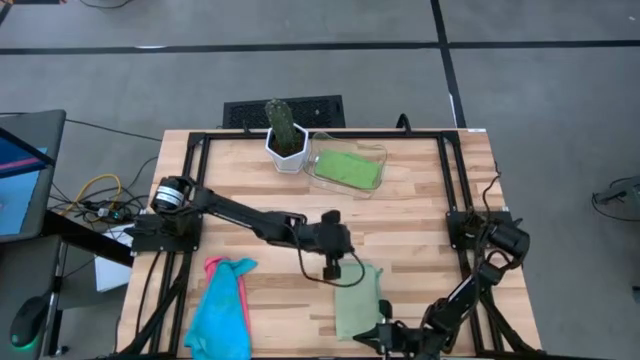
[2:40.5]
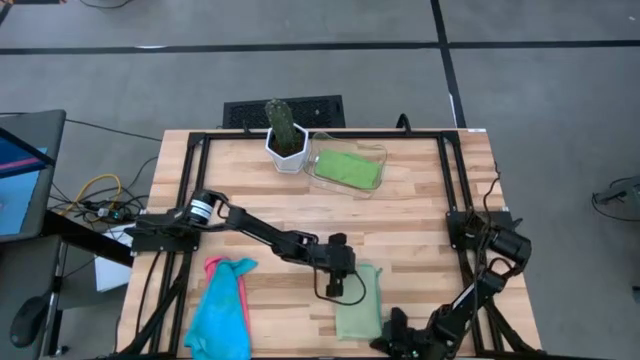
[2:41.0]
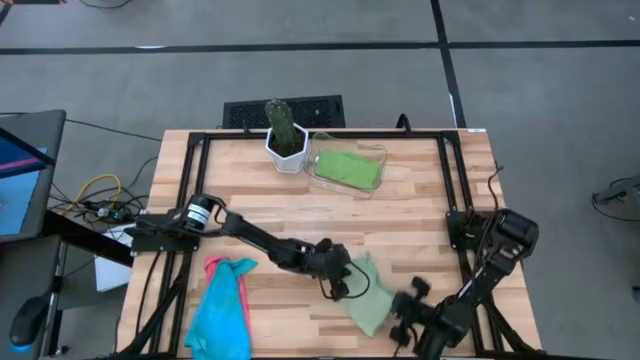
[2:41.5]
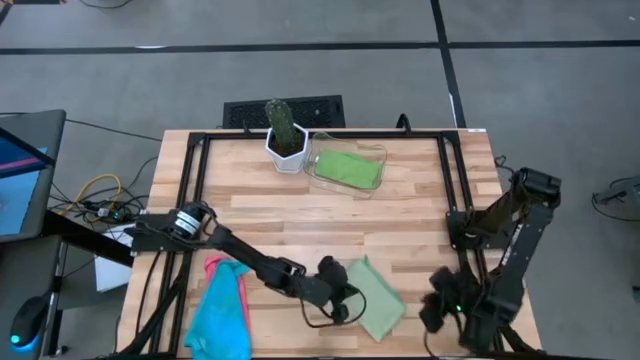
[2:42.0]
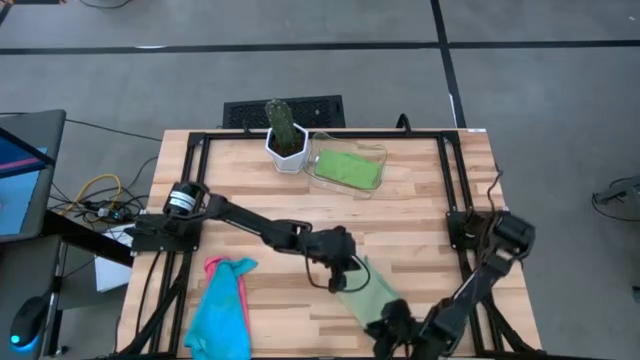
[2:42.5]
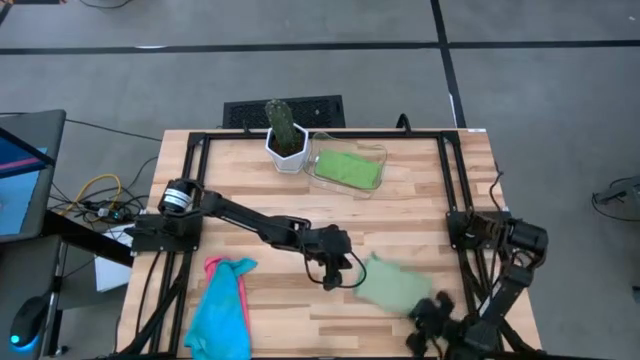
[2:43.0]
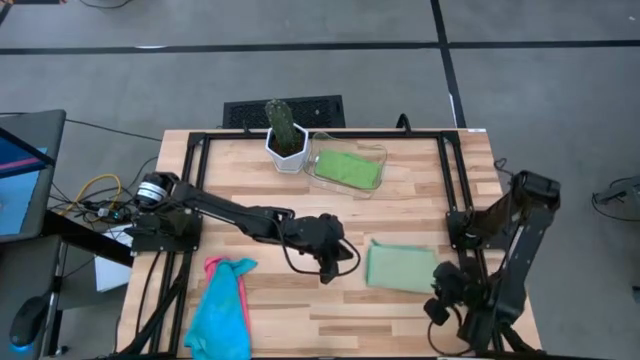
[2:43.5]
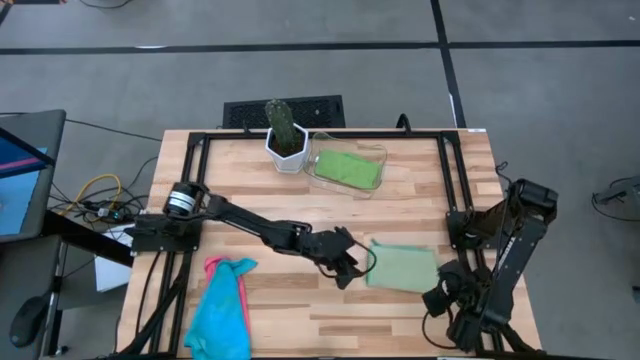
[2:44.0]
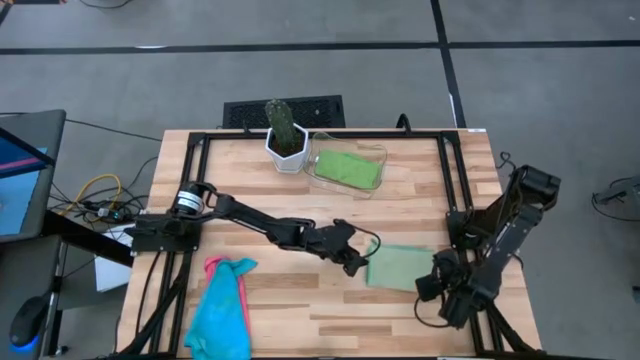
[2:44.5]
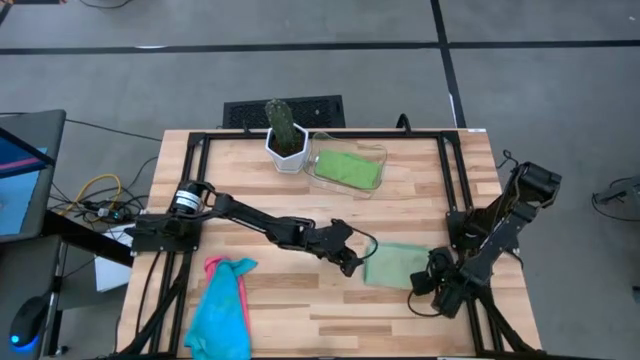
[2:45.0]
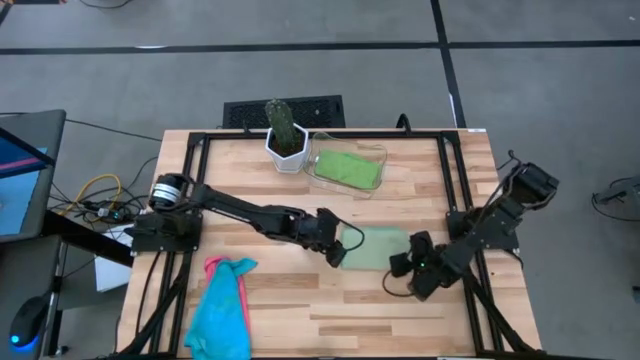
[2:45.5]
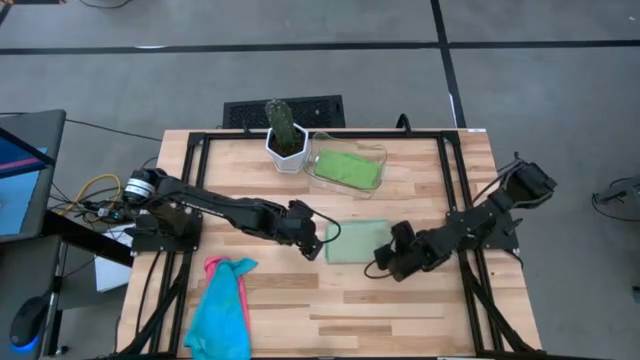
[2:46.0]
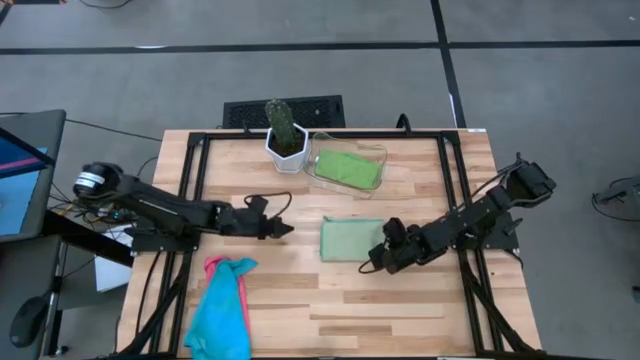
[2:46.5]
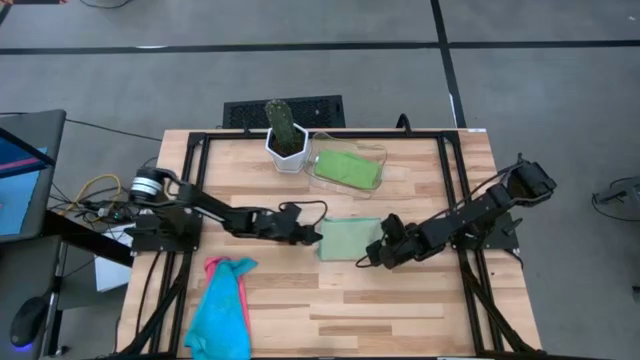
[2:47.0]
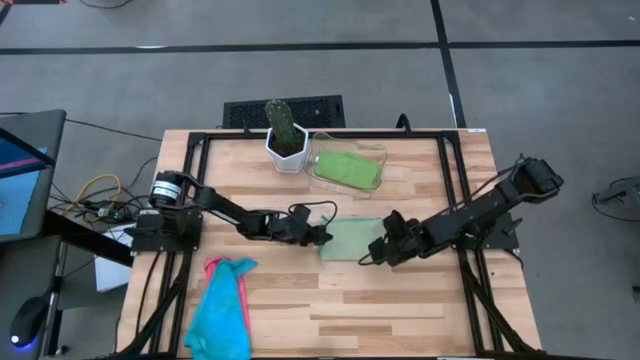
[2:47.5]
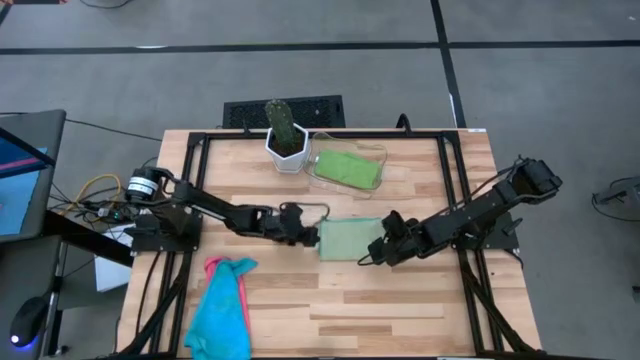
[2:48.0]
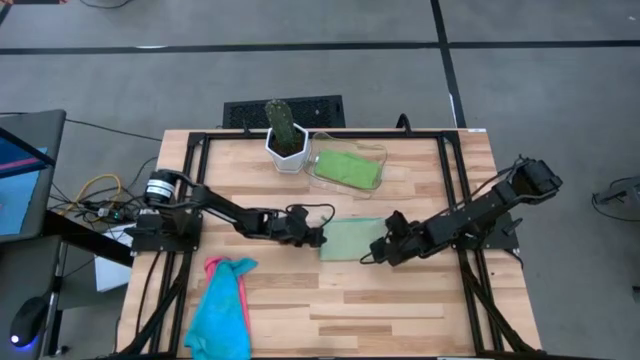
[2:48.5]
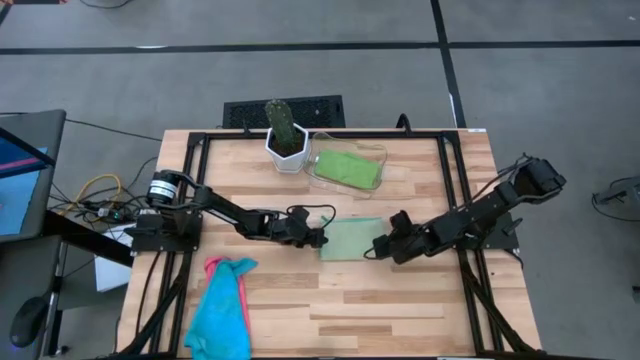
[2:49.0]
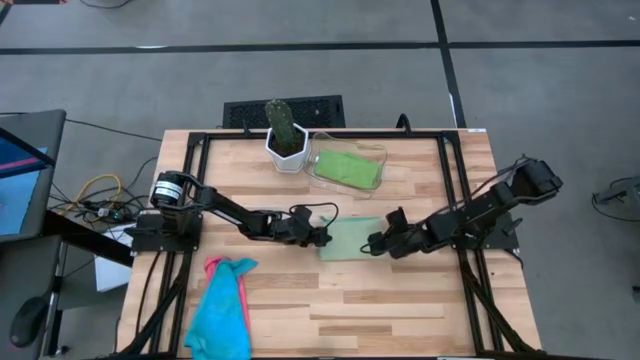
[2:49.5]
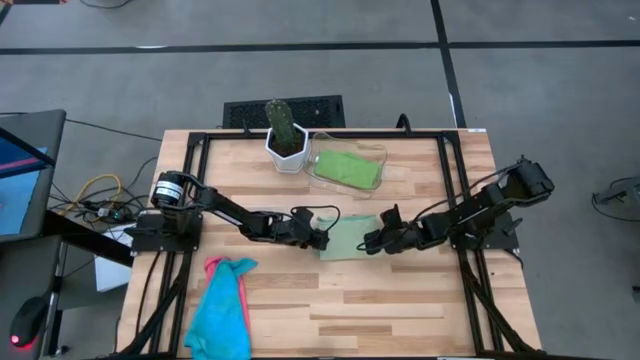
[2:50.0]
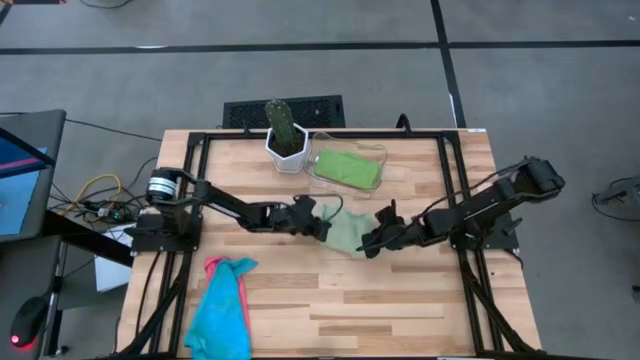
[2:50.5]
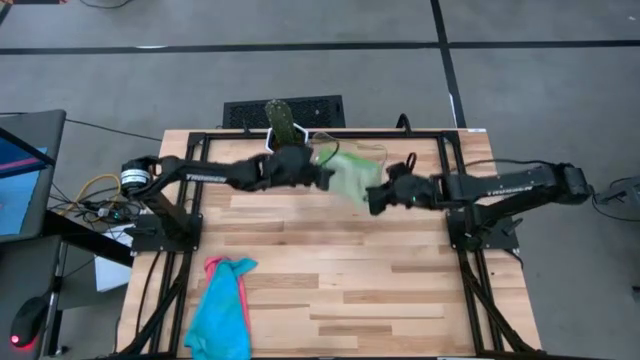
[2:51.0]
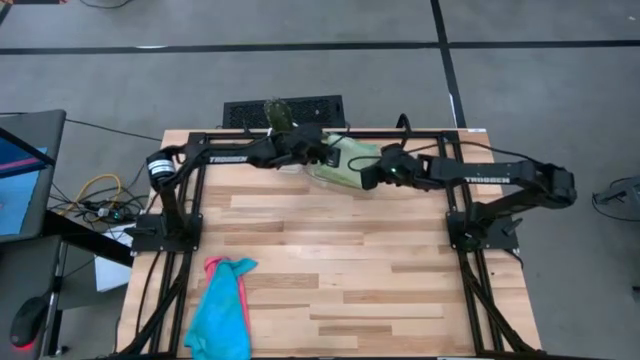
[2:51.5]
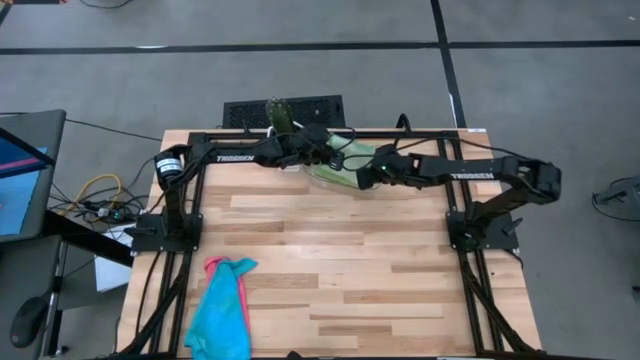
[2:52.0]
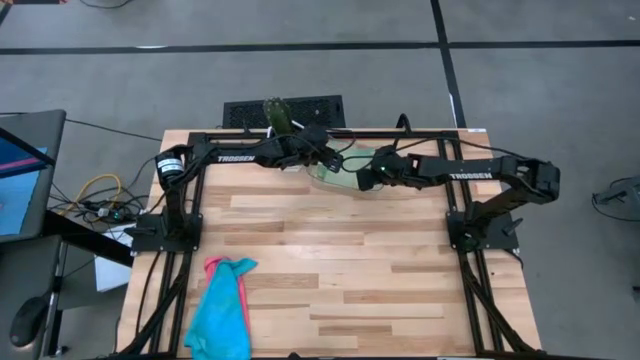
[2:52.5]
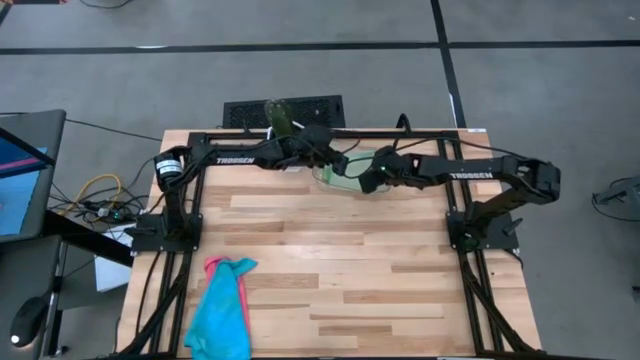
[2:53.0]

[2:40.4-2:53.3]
Task: Fold microfiber towels
Put the folded light green towel into the transparent bin

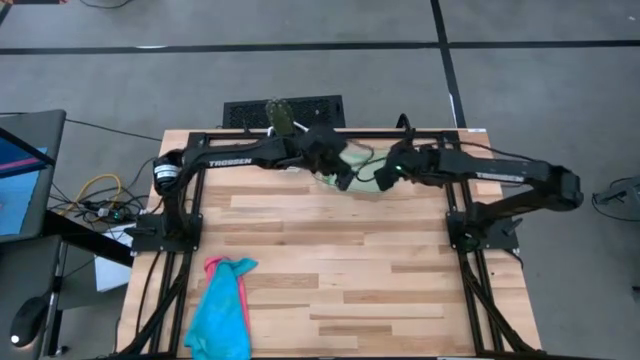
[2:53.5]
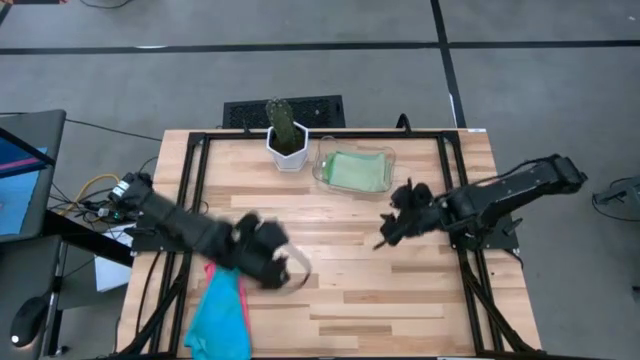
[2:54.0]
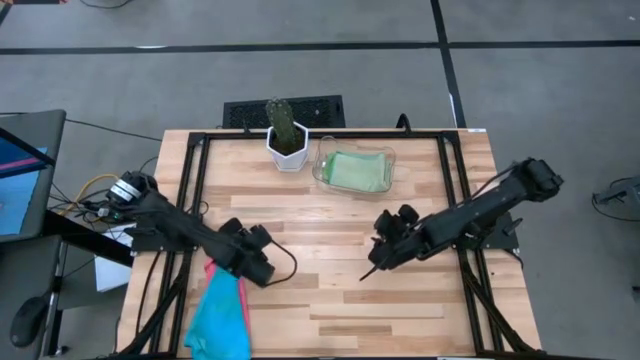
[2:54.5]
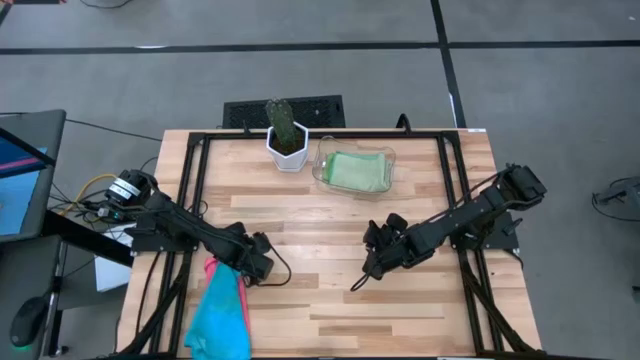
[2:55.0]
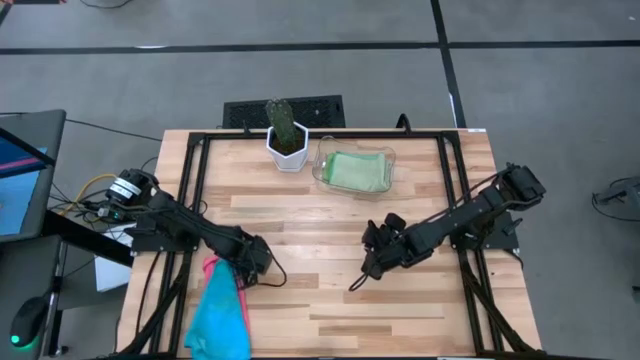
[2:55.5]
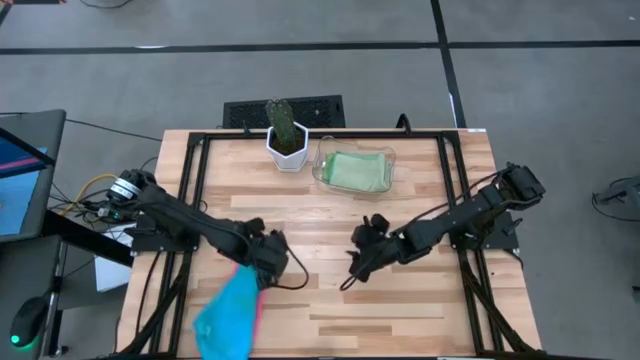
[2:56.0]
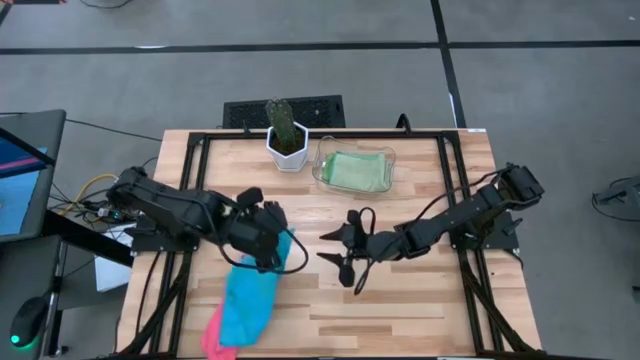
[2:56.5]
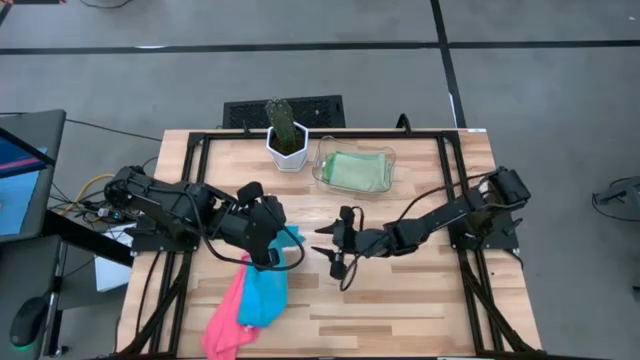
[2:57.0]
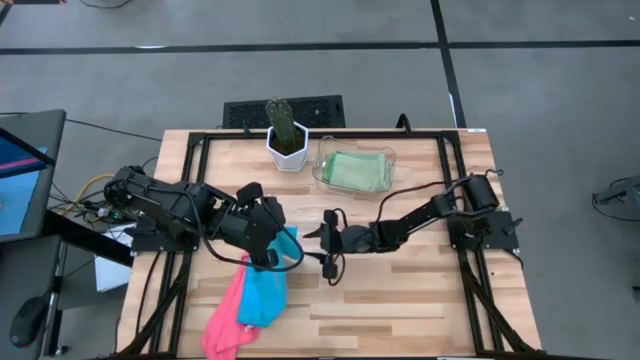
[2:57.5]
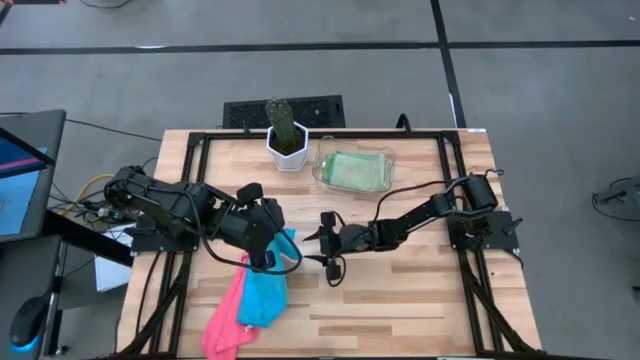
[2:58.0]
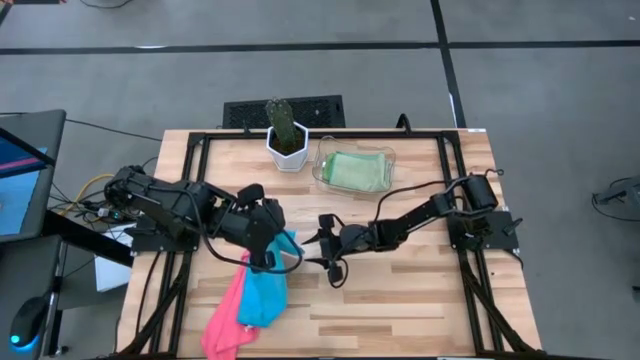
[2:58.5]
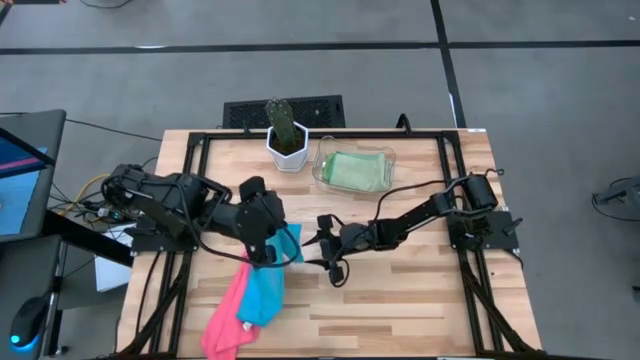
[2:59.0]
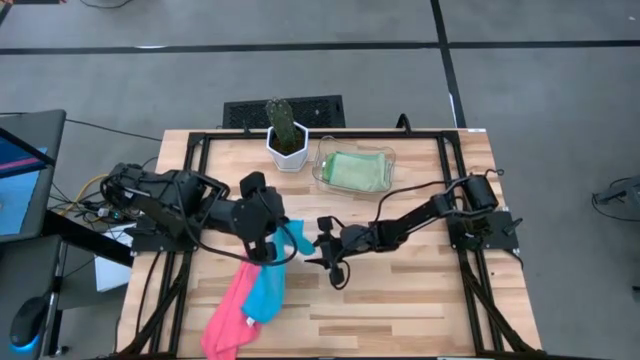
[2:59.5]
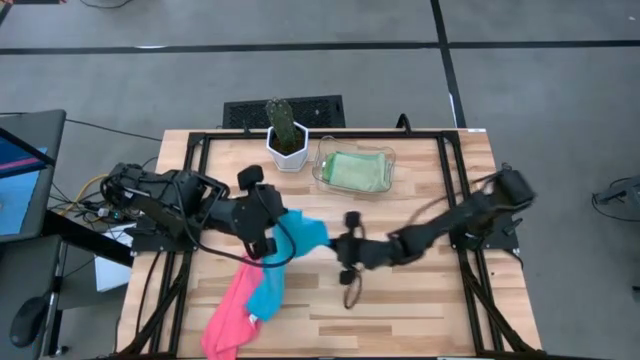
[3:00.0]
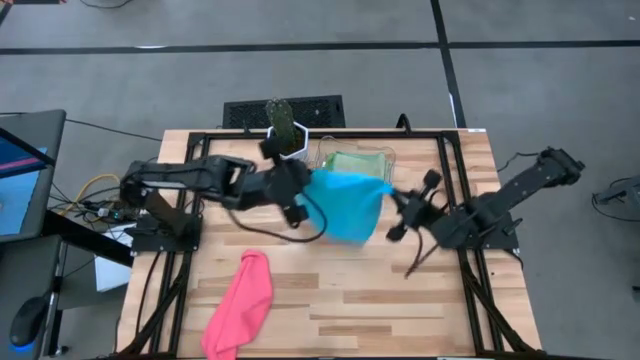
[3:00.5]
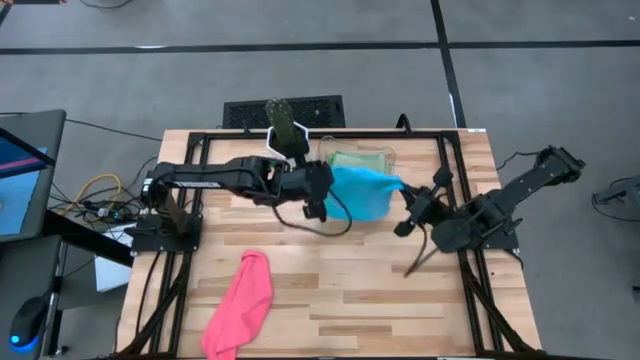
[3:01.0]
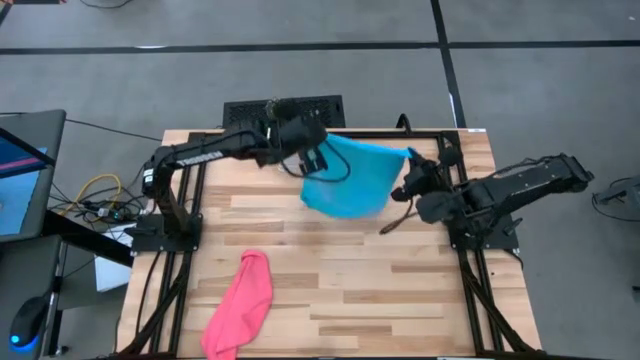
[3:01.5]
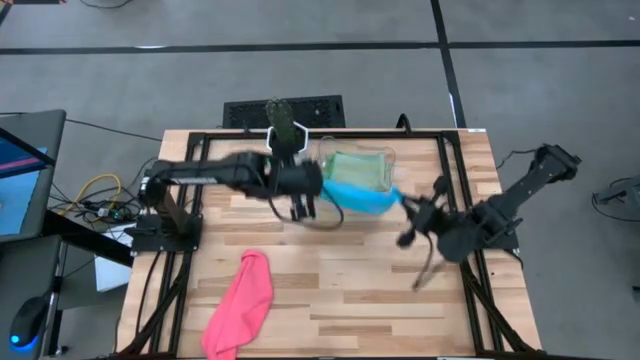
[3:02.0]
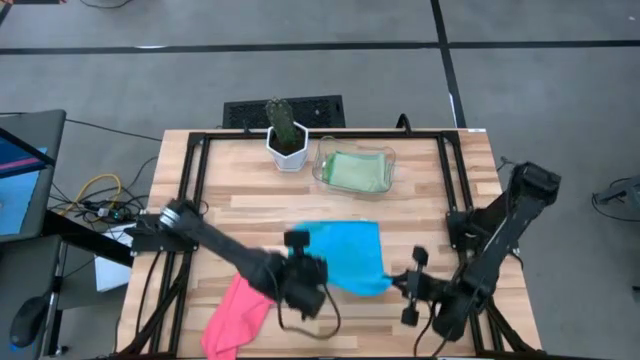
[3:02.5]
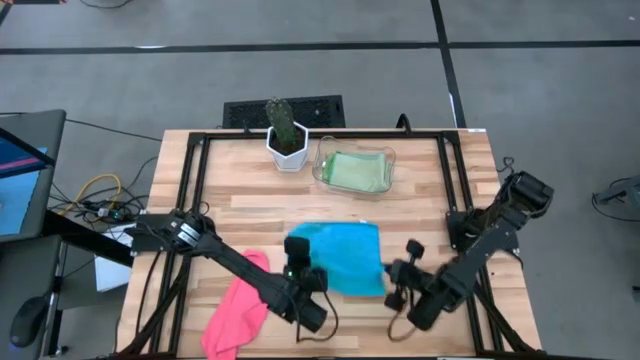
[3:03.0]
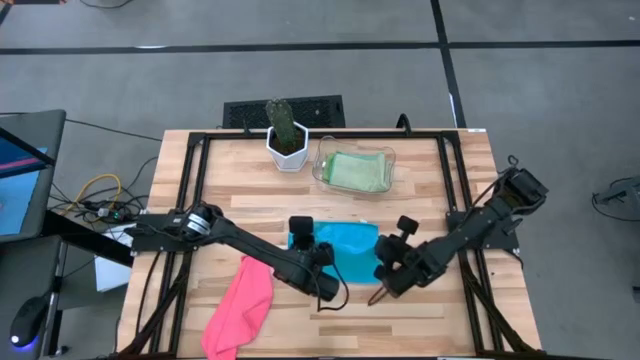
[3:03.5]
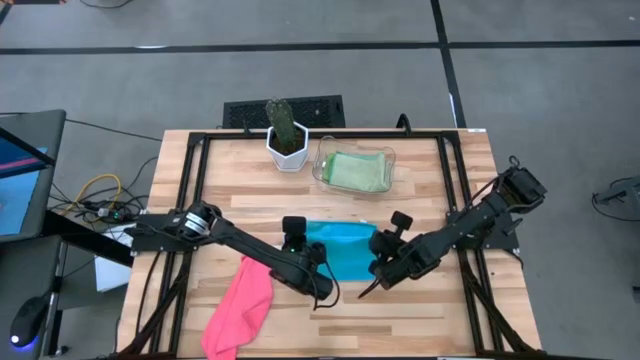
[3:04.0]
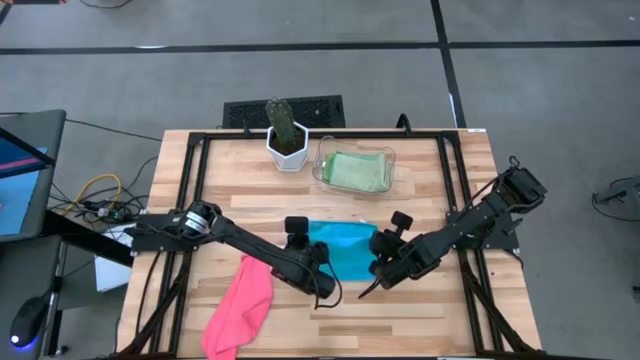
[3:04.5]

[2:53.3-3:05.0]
Fold the blue towel on the table
